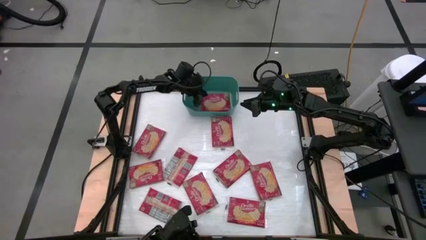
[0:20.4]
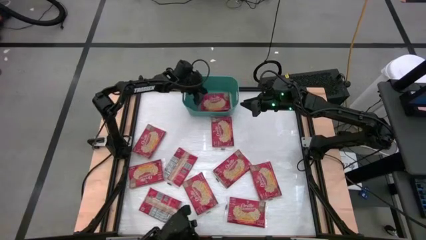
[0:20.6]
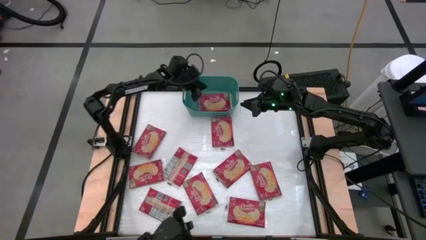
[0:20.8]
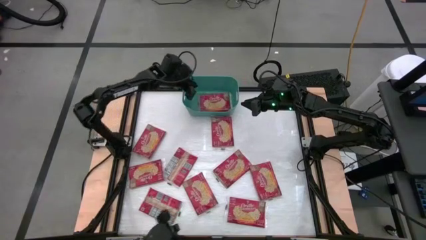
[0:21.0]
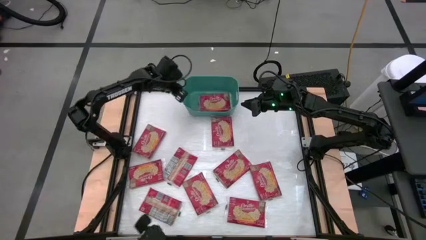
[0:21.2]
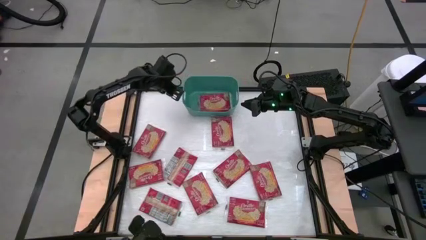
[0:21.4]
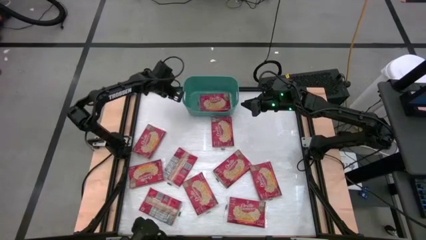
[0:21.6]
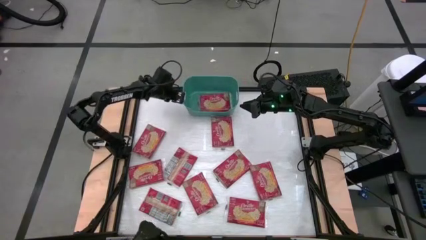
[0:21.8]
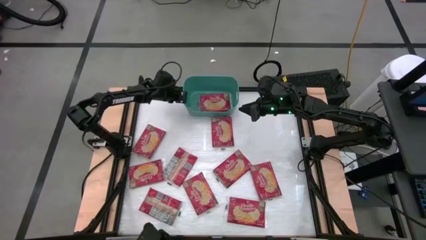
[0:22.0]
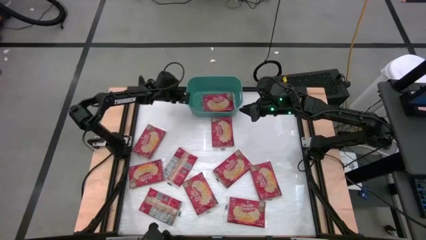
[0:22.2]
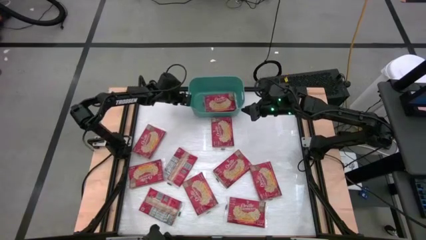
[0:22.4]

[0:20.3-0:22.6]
Task: Sort popcorn bags into baskets
Adjust the green bin

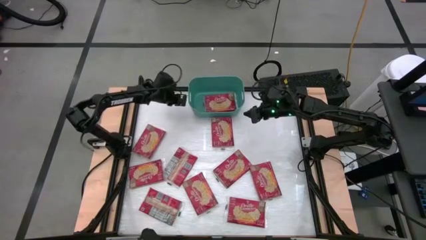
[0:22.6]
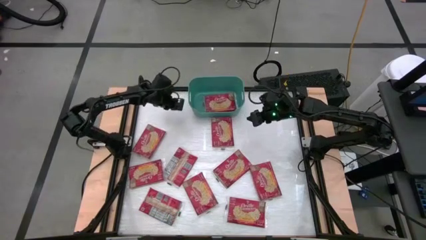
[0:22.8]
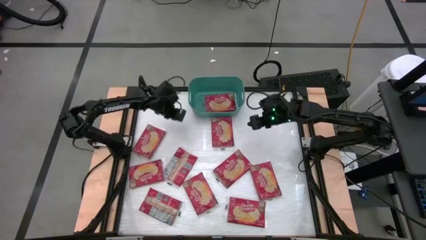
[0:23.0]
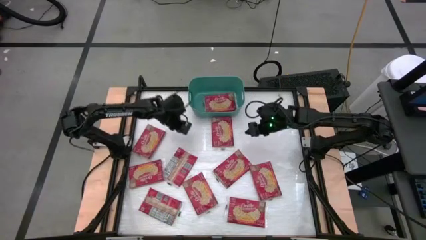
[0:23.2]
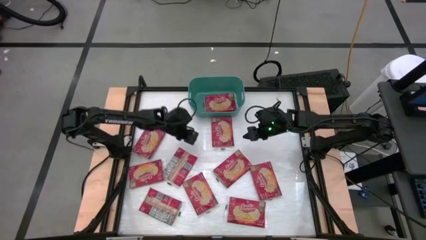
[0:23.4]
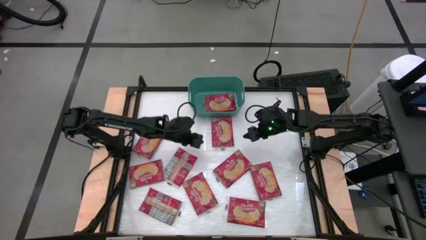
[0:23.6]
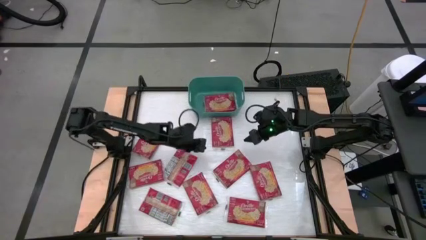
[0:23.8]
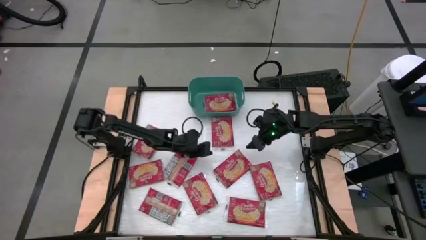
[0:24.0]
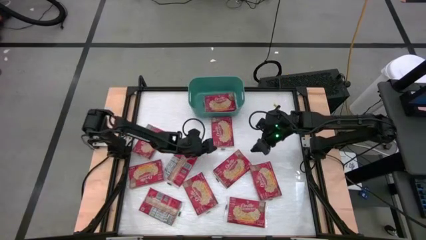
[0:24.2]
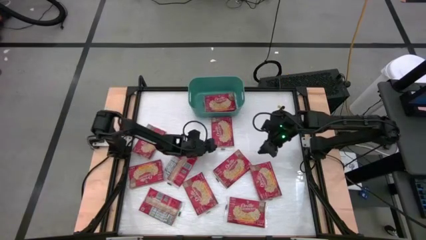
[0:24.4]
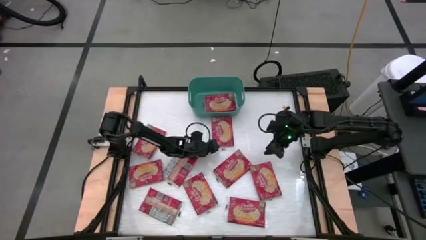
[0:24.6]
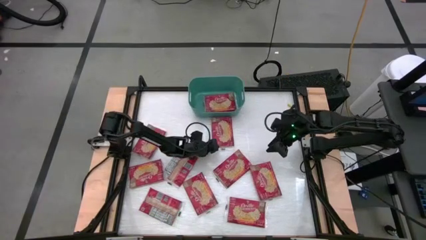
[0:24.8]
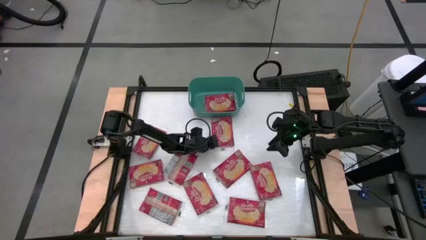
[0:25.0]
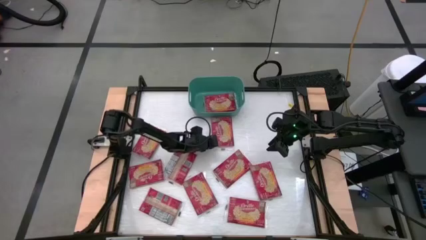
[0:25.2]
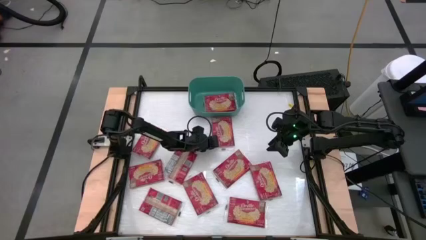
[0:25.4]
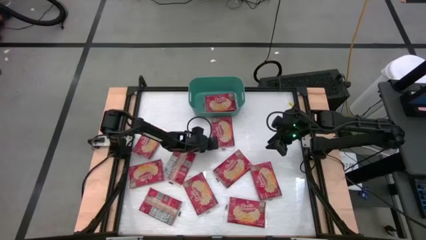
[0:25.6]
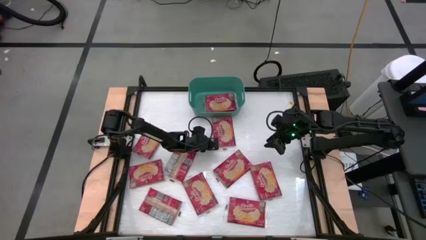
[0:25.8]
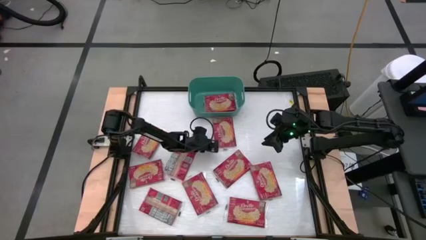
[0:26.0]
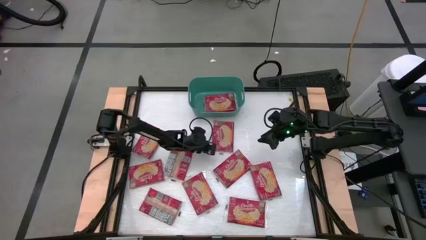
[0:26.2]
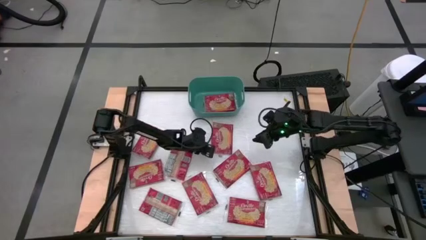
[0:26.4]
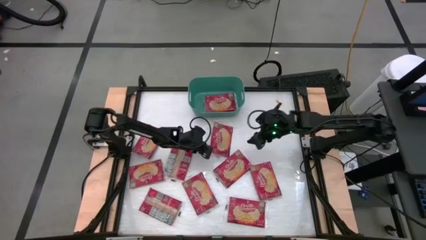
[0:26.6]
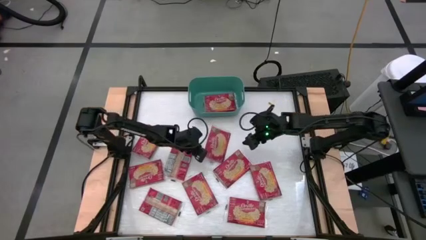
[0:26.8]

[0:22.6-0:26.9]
Put the popcorn bag into the green bin

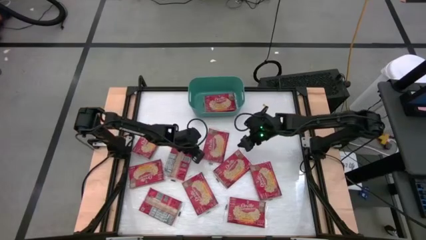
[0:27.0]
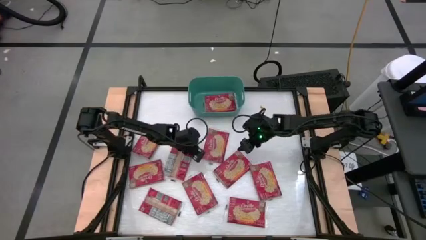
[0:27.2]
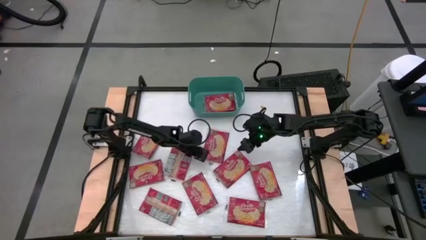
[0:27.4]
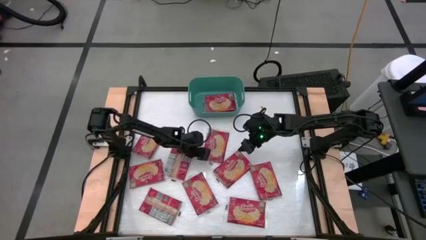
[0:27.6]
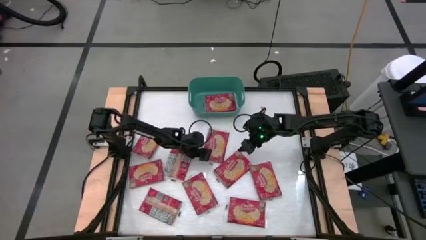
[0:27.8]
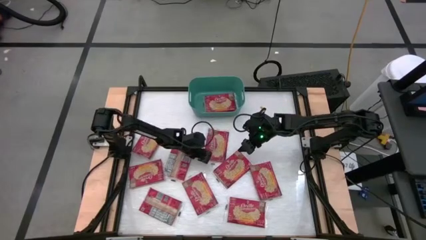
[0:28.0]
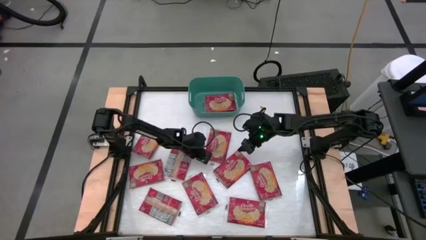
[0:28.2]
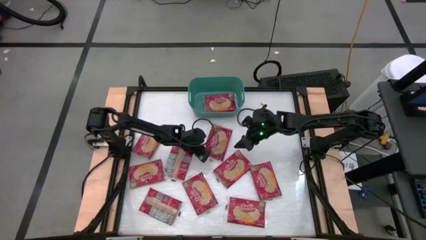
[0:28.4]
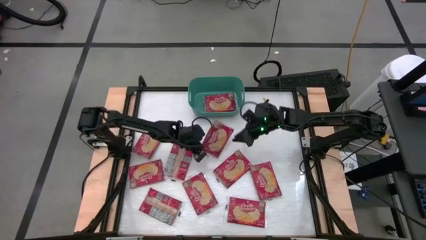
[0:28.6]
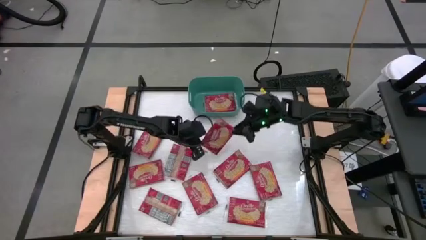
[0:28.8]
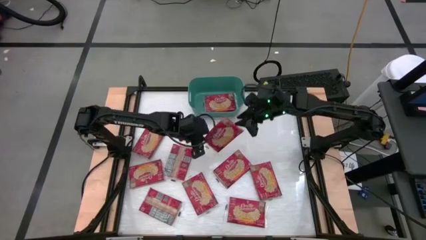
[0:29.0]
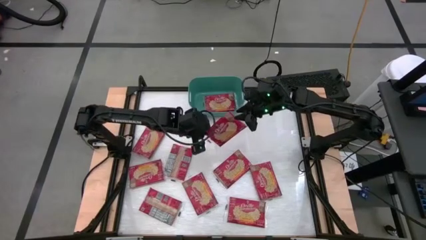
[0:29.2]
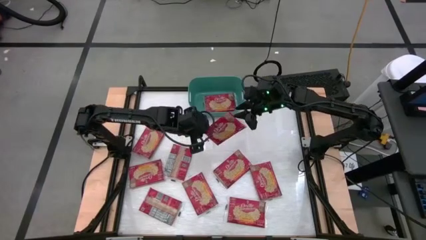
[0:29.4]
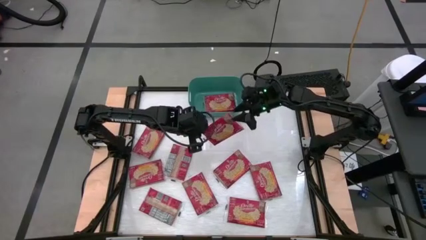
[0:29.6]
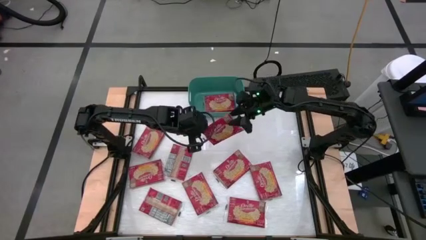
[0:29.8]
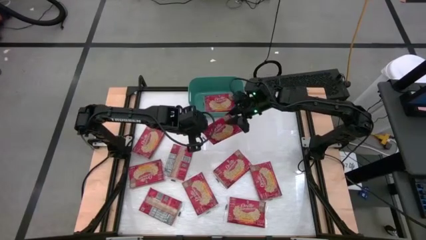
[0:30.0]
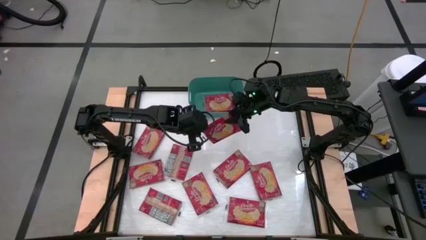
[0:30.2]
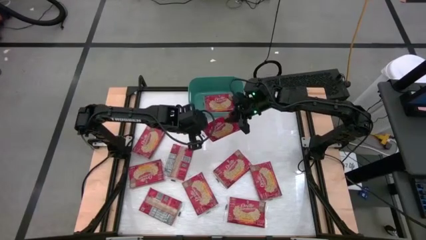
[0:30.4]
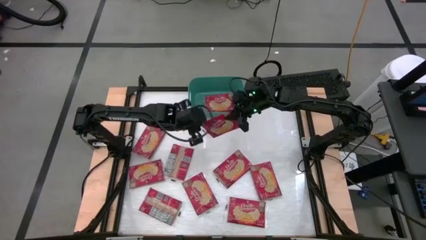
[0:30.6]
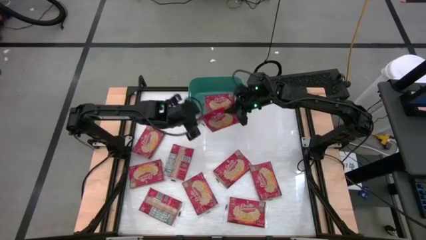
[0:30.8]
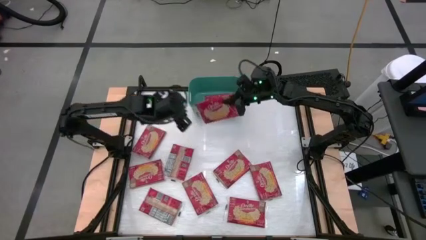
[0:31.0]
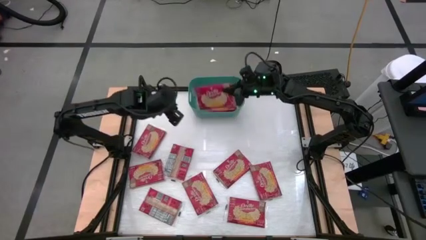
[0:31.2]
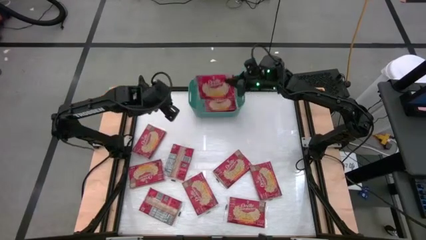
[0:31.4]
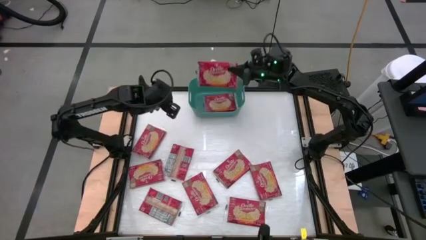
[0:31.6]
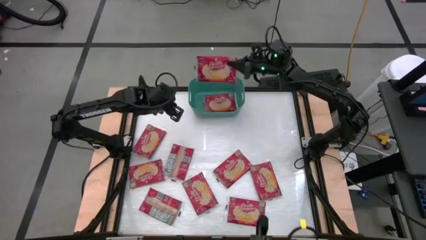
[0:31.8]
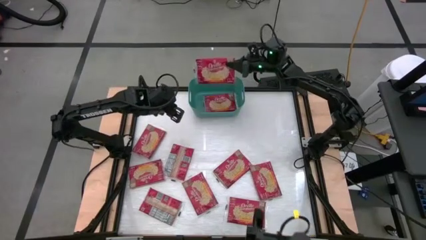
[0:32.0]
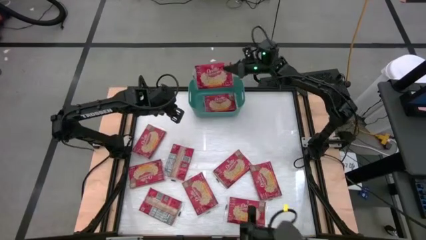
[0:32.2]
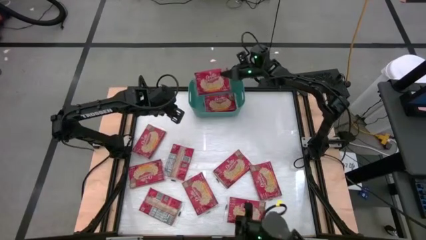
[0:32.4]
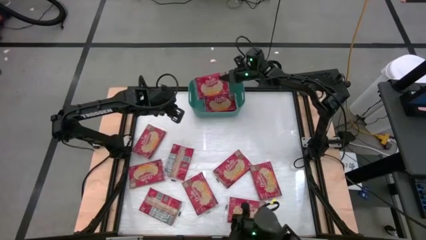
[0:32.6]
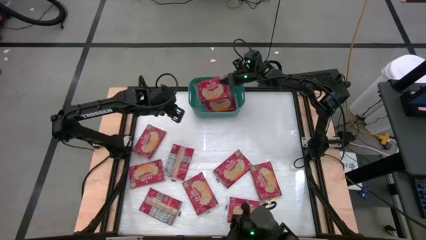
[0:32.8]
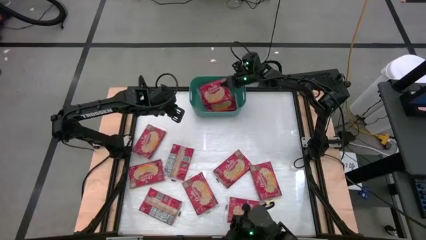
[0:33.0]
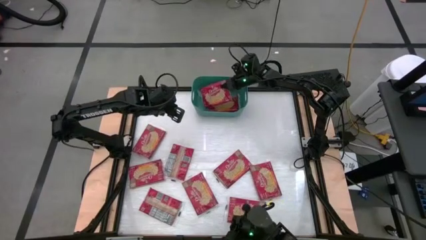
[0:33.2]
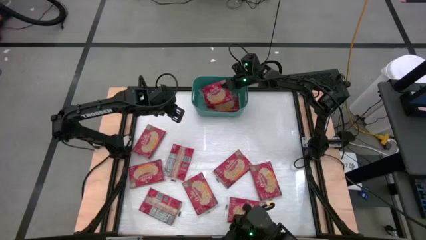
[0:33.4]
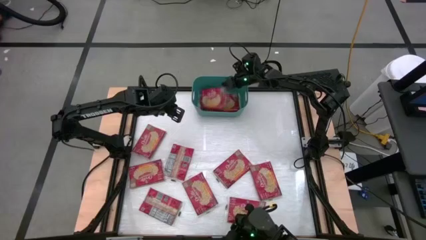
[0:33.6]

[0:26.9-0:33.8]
Put the popcorn bag into the green bin

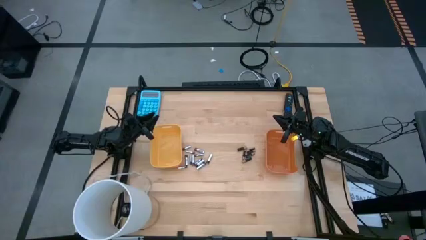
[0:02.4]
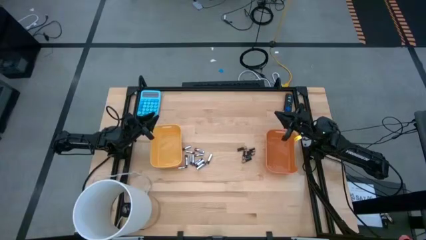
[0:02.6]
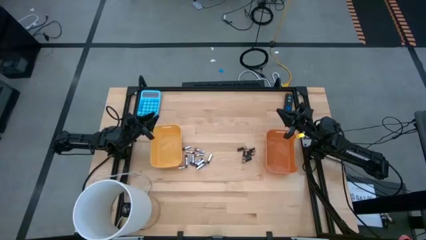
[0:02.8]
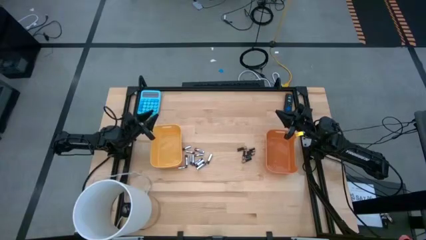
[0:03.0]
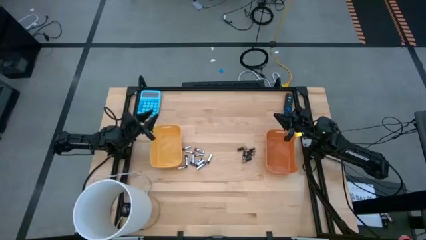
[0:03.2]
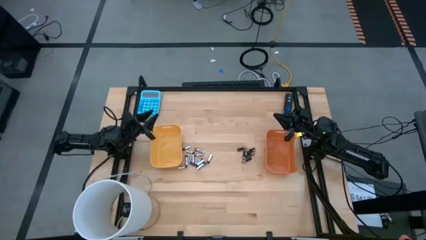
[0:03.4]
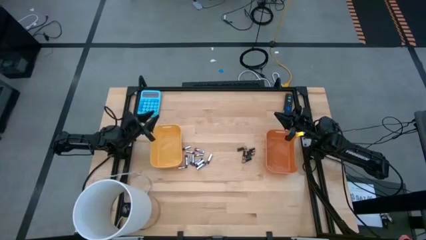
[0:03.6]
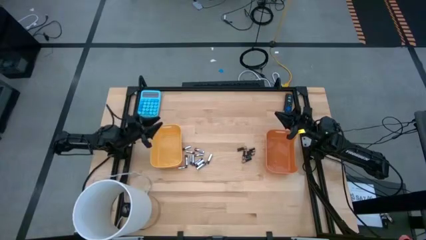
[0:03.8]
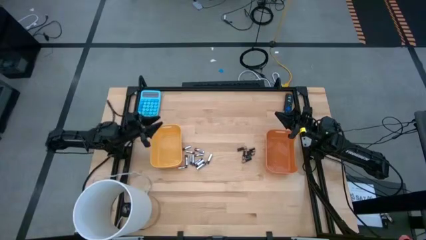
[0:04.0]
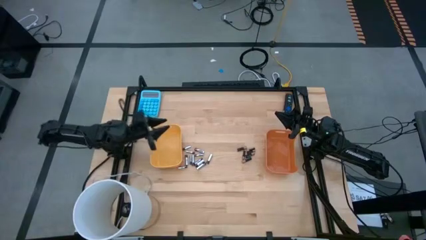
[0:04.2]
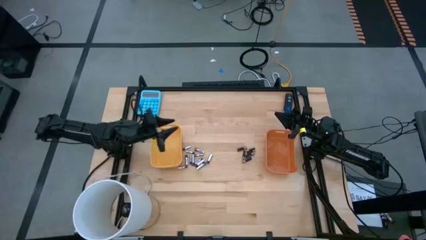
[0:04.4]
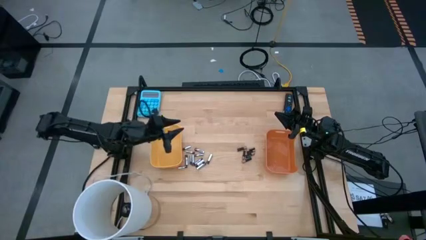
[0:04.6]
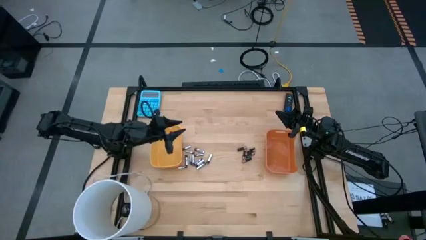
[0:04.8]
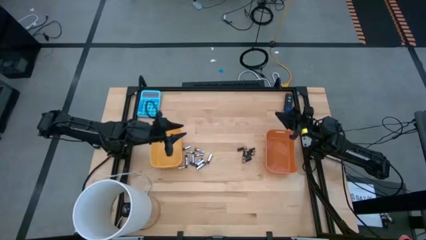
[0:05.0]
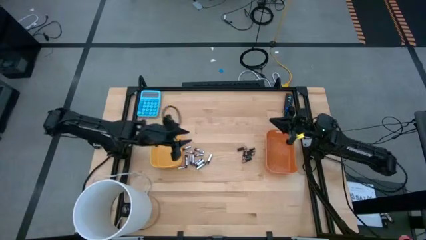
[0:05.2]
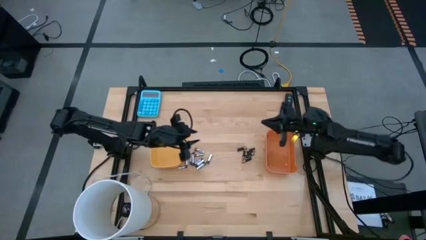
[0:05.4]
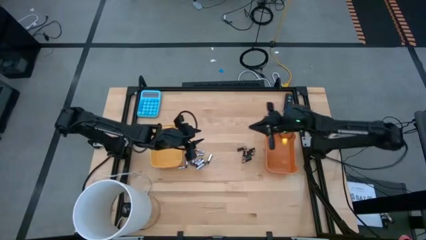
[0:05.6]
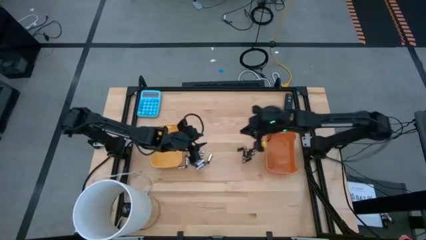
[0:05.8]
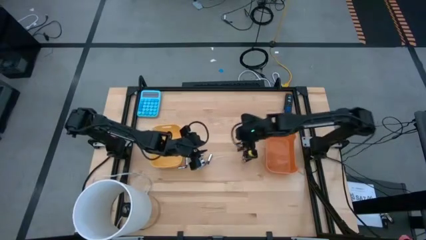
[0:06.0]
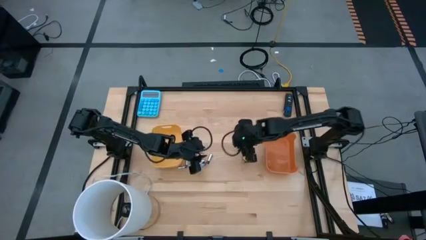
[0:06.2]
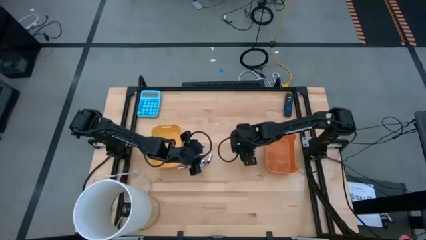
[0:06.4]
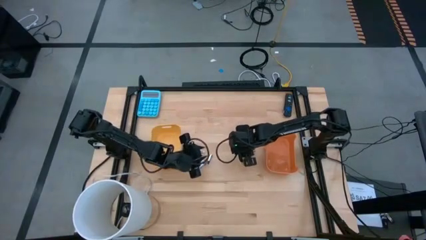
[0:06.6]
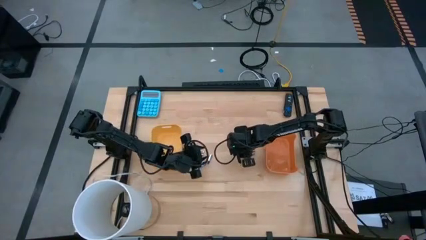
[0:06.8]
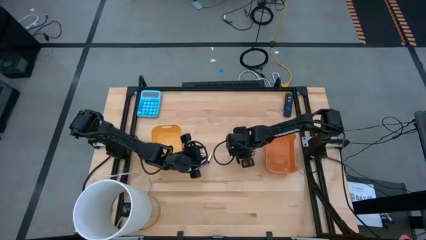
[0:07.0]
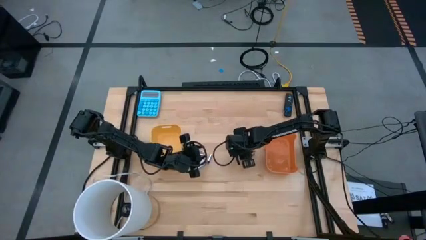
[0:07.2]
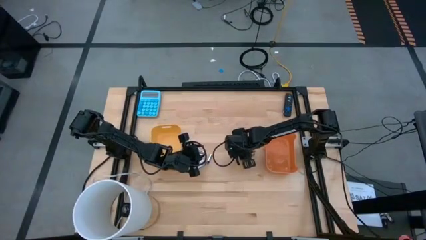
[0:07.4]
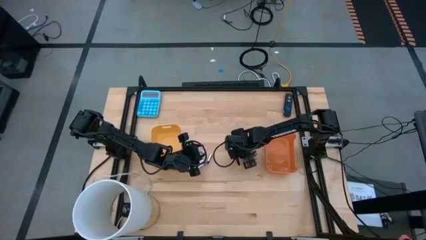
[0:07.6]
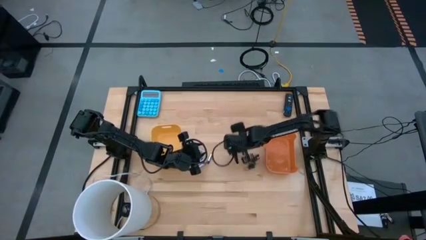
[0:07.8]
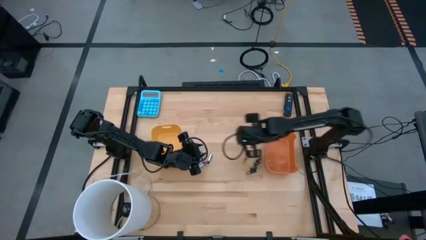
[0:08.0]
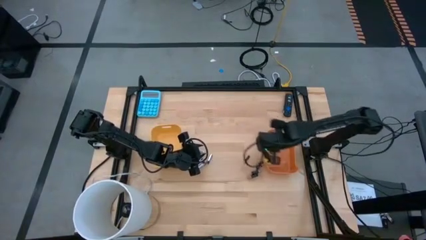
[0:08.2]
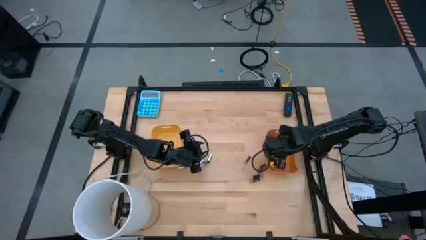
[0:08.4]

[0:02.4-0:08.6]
Task: Sort batteries
Put the black battery into the orange bin
